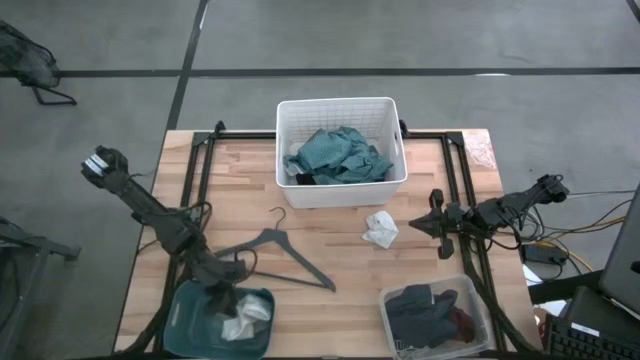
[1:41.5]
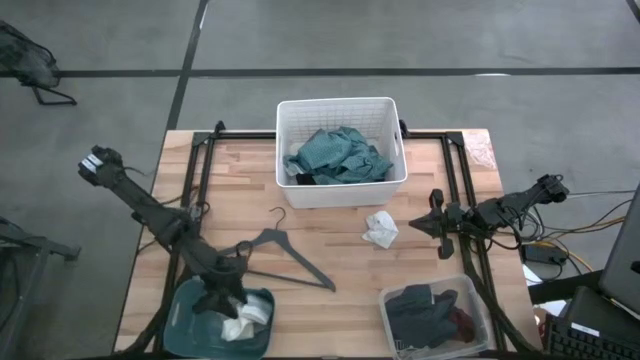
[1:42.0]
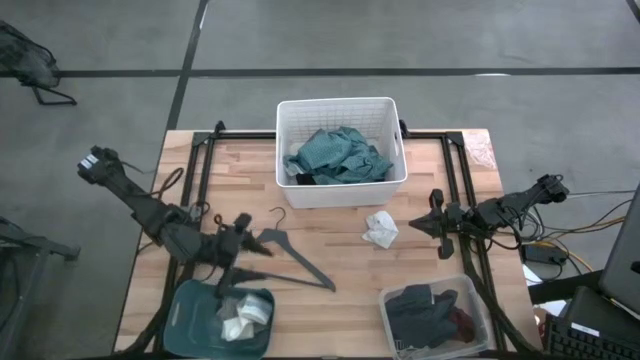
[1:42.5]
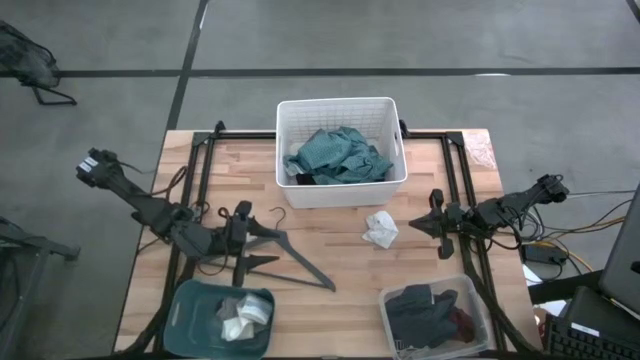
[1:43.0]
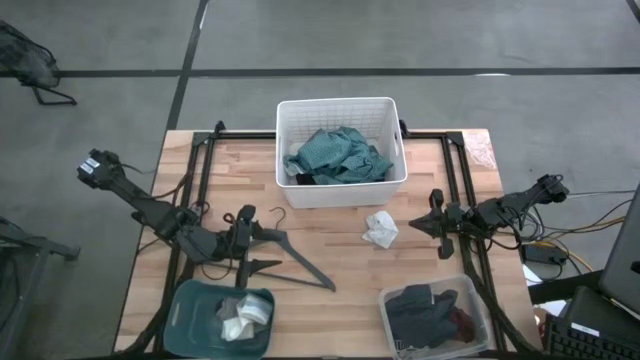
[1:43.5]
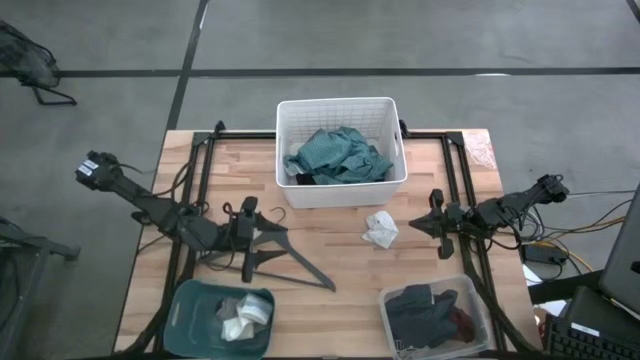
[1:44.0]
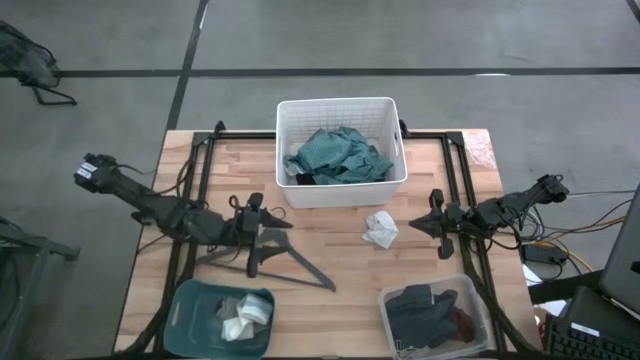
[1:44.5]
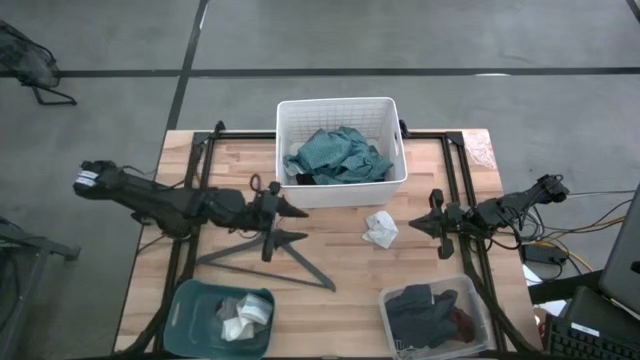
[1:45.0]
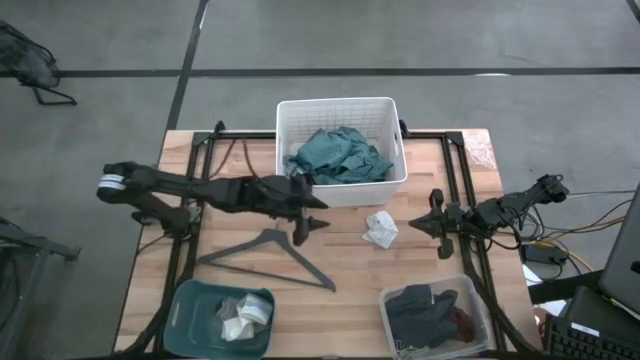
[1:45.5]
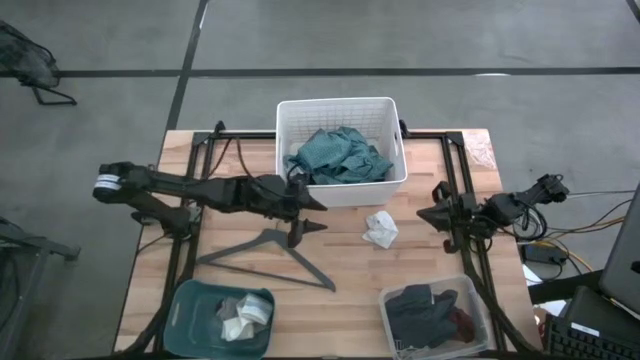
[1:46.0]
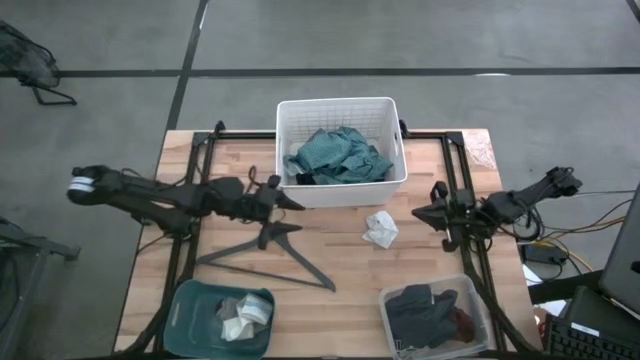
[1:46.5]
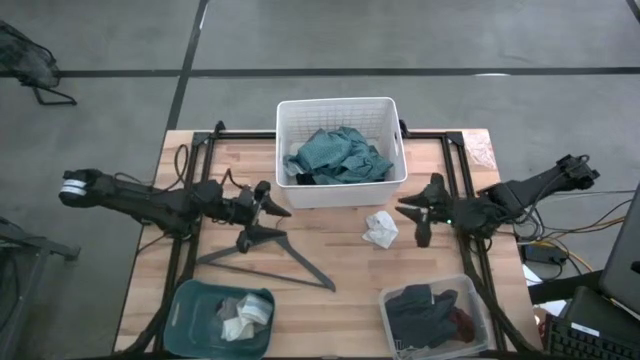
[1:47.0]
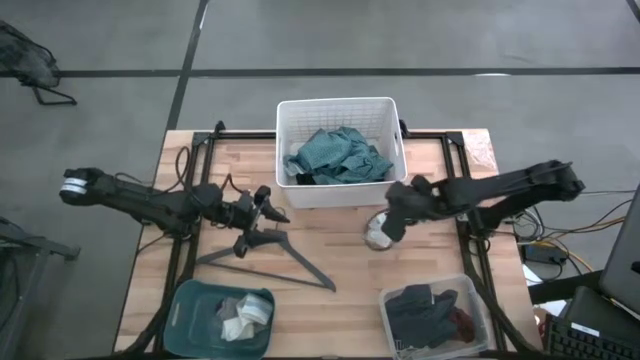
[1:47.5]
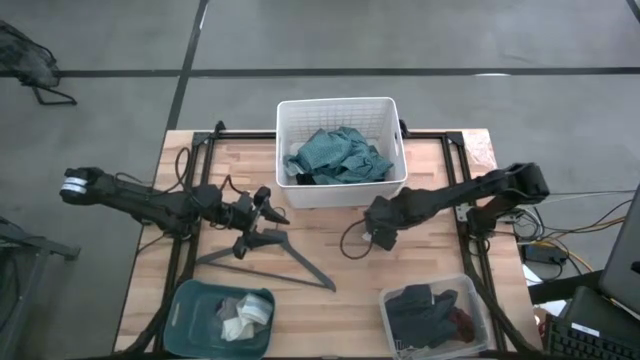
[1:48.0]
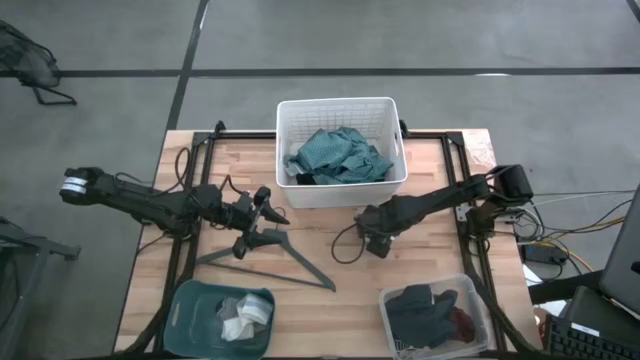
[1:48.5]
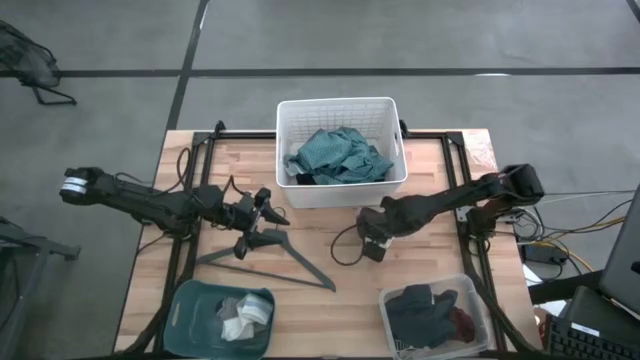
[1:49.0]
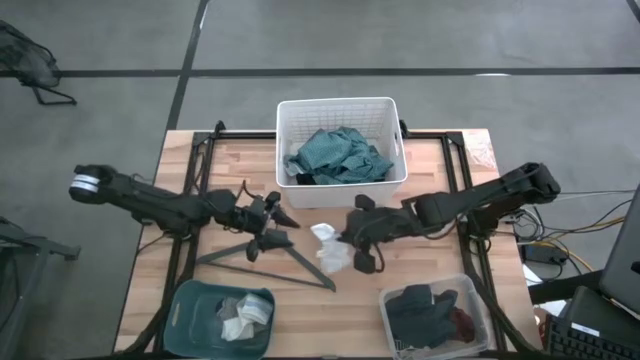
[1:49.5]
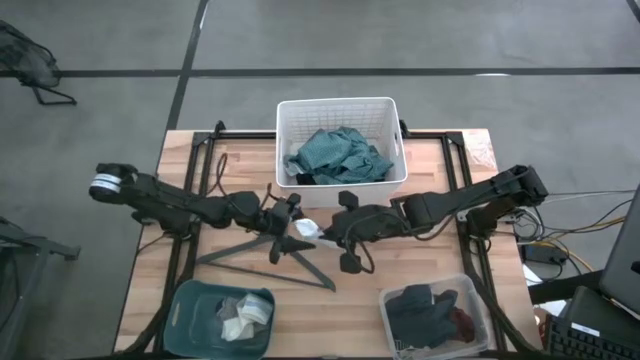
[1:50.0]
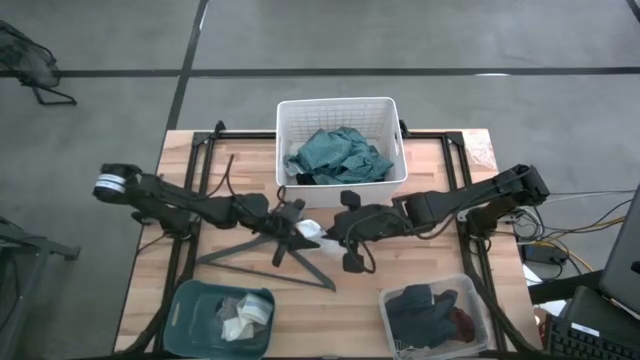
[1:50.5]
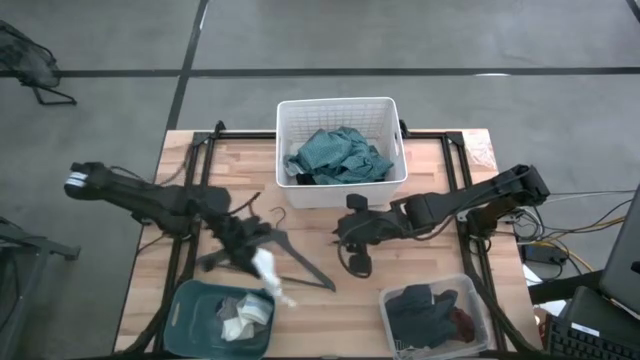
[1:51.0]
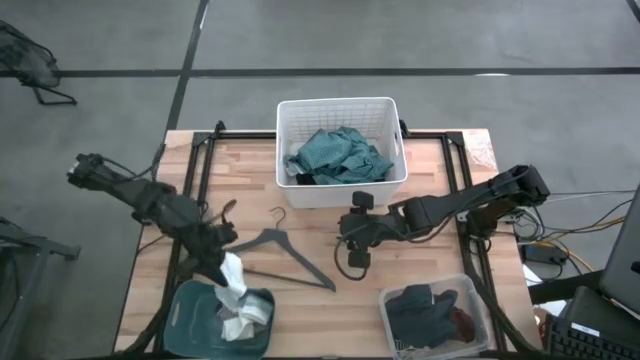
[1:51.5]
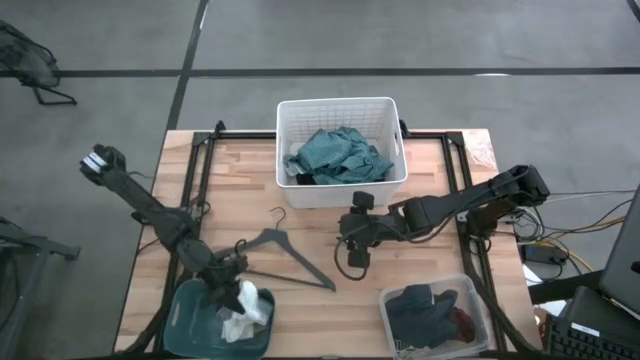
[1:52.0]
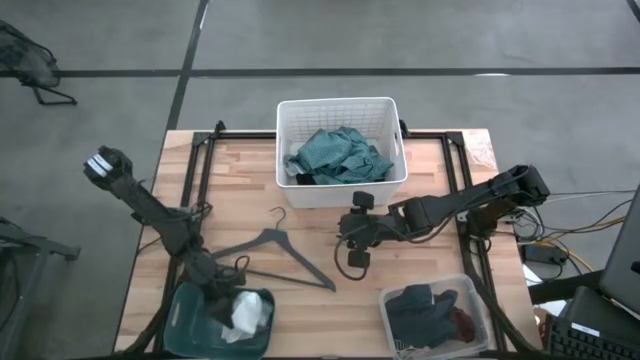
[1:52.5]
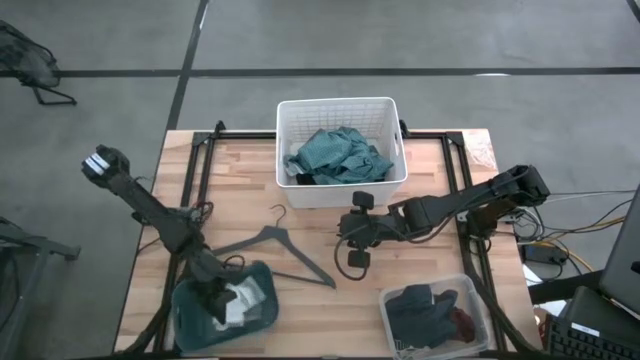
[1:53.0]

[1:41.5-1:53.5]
Task: Pick & Place Cloths
Put the white sock into the blue bin

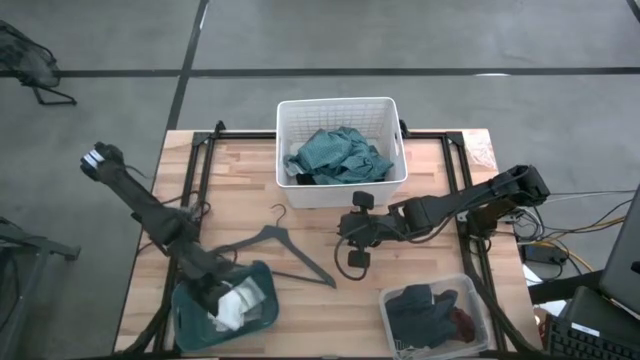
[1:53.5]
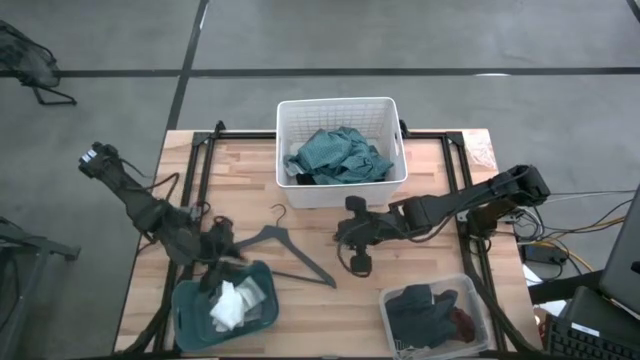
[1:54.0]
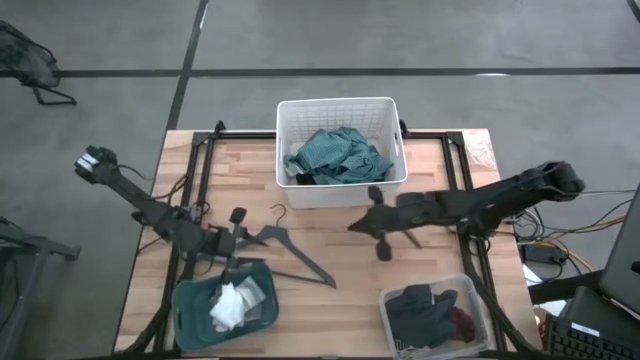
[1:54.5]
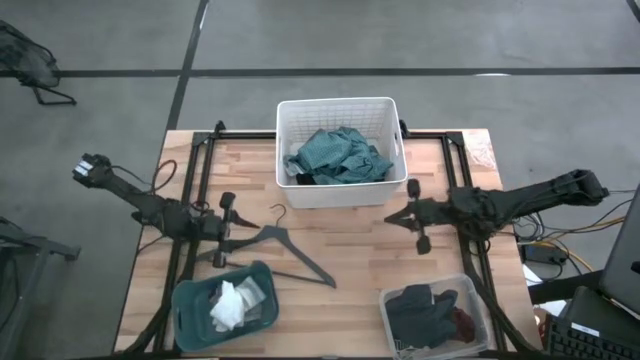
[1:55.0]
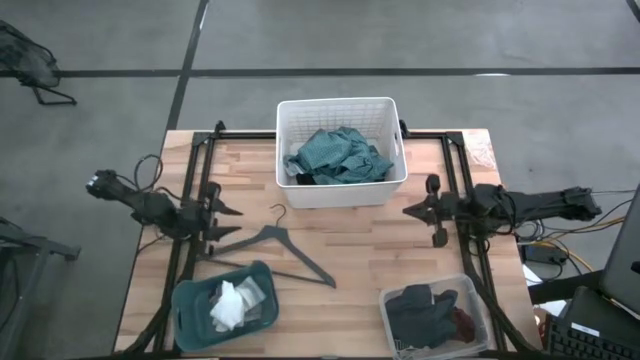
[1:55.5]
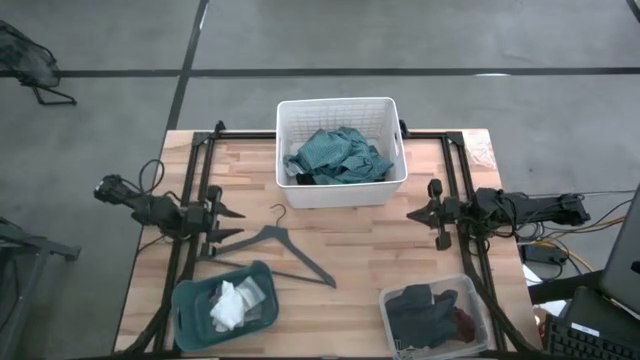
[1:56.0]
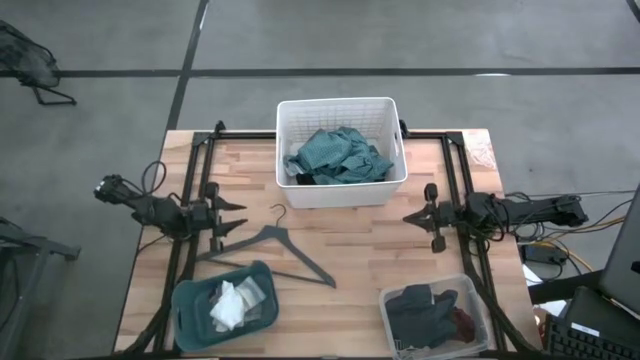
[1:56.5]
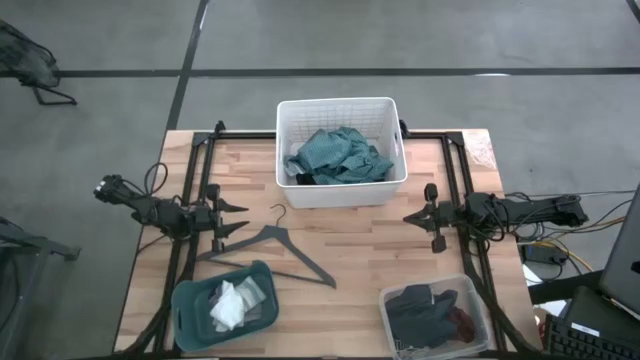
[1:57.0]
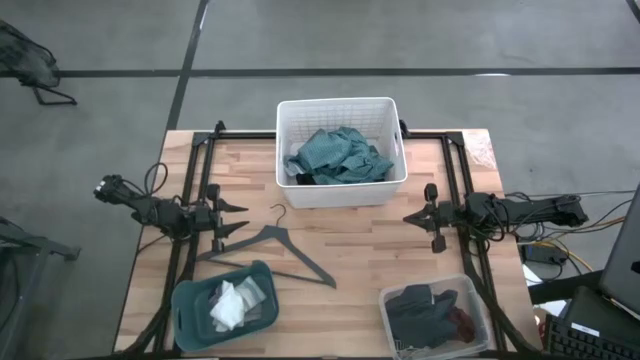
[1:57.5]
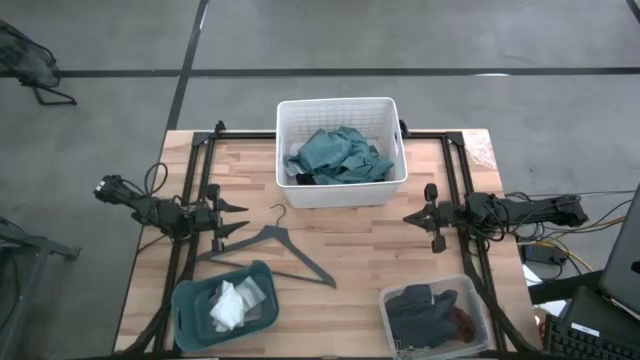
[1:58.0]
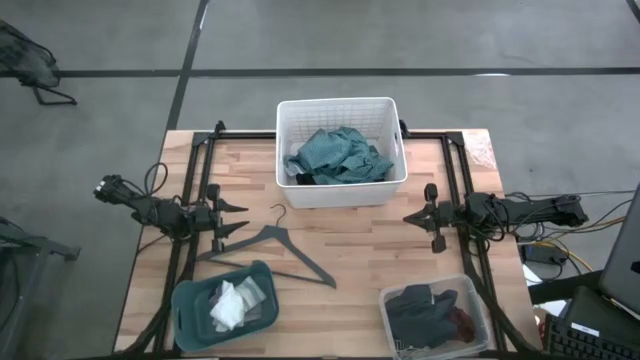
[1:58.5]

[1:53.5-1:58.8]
Return to Home Position

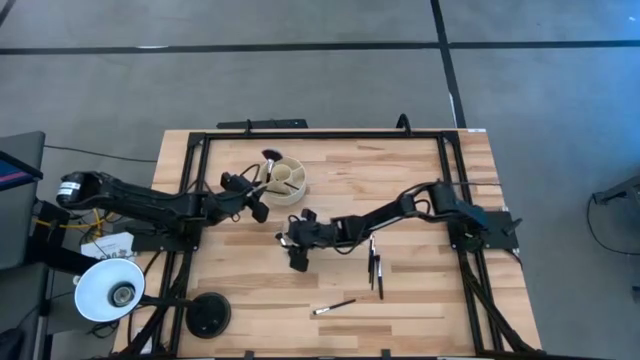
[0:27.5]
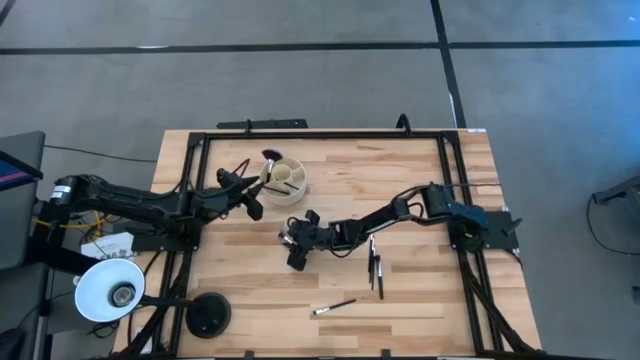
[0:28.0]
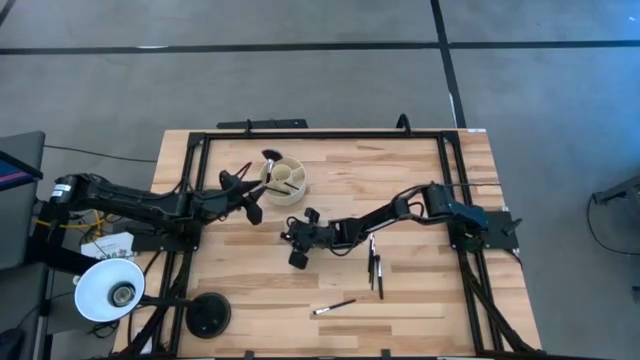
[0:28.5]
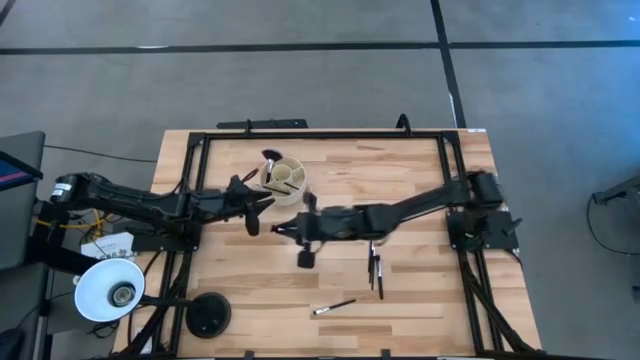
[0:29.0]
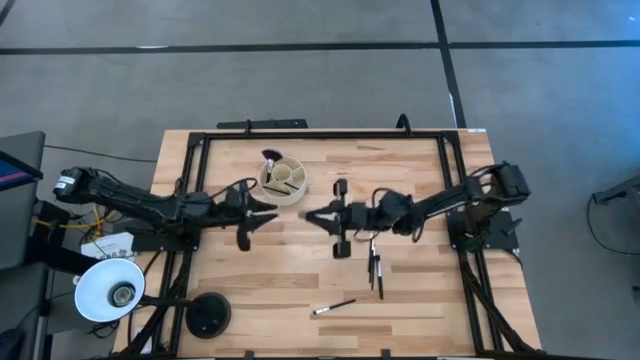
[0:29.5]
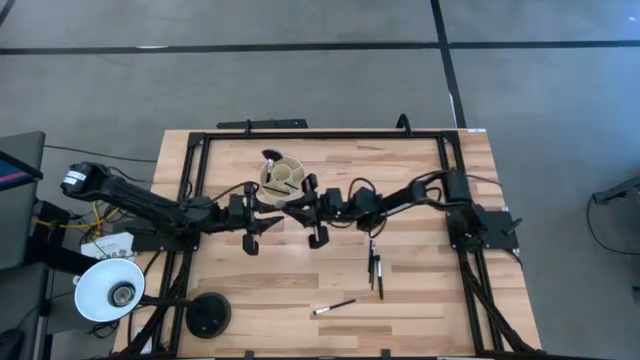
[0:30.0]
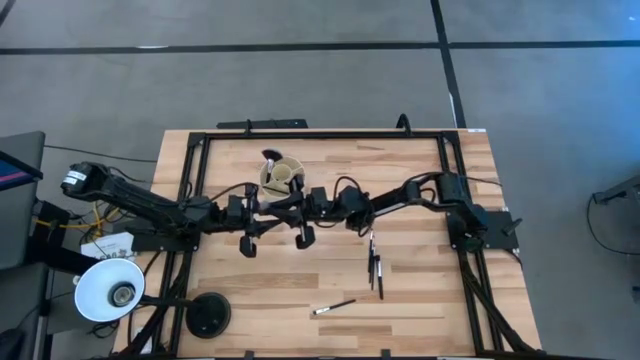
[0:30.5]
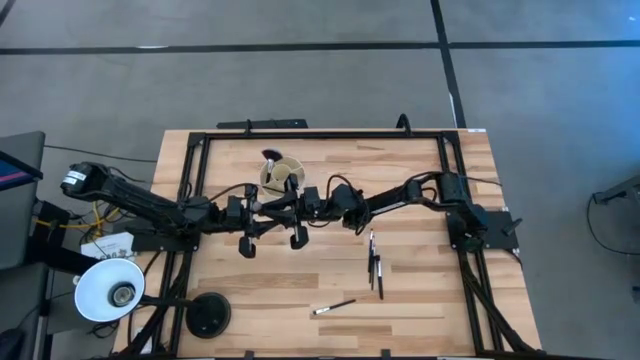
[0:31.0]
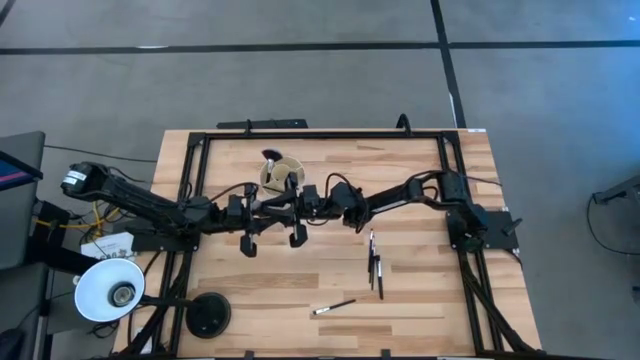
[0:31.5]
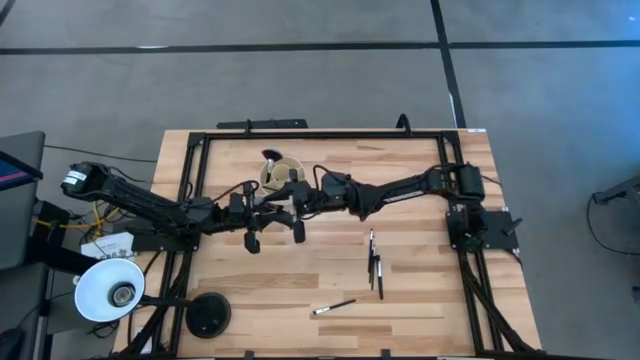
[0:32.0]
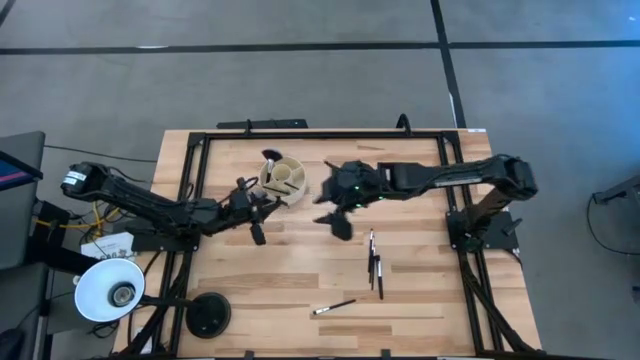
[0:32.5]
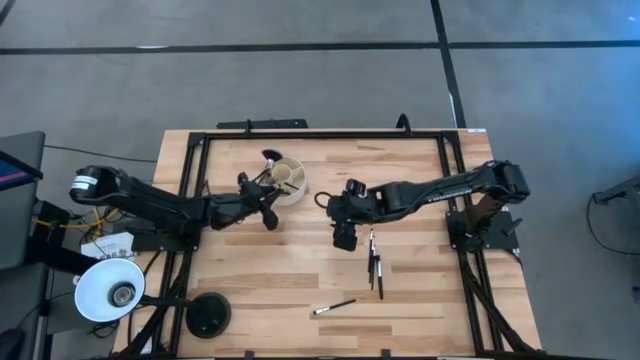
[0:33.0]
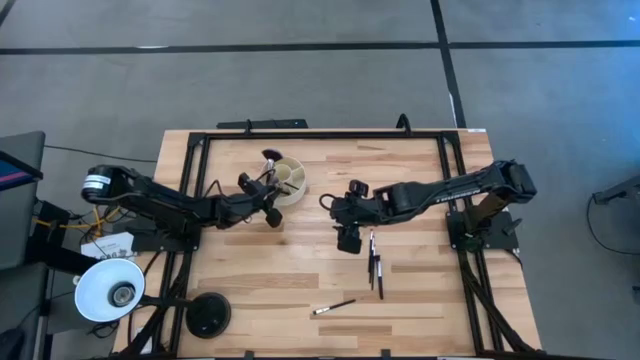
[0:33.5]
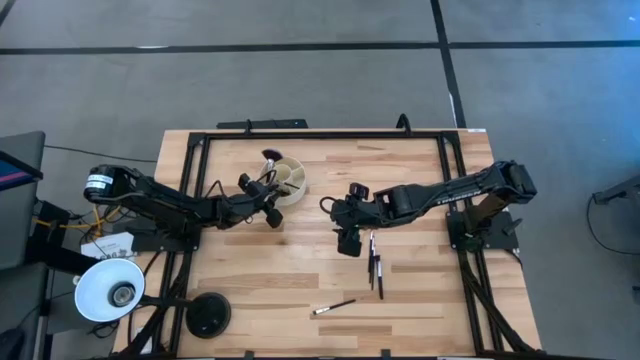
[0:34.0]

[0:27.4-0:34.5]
Task: Sort items
Put the black powder brush in the white organizer
